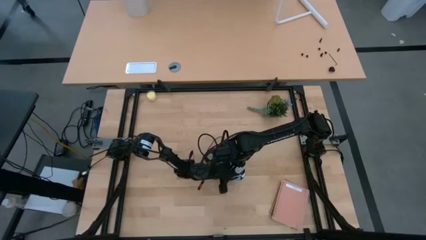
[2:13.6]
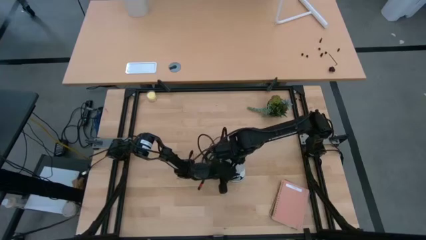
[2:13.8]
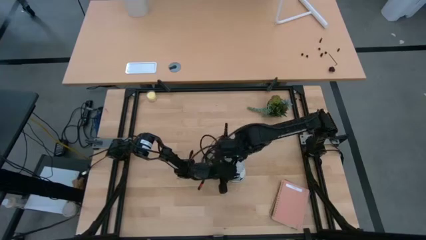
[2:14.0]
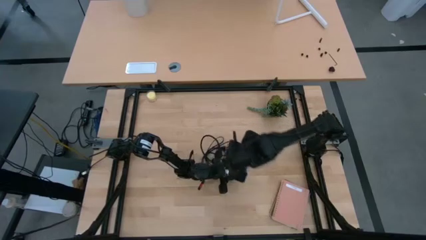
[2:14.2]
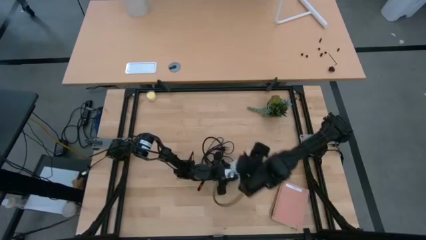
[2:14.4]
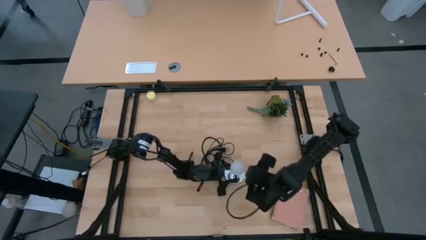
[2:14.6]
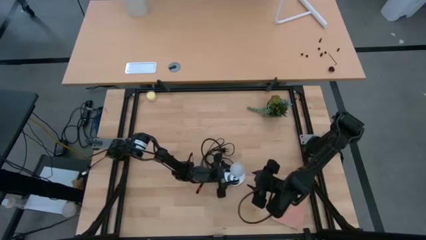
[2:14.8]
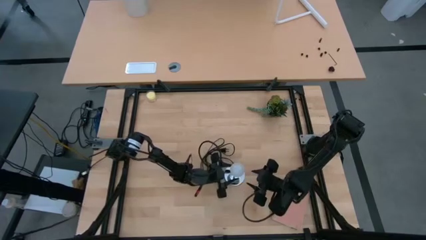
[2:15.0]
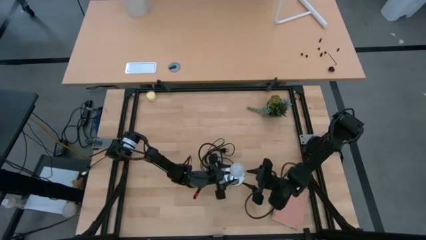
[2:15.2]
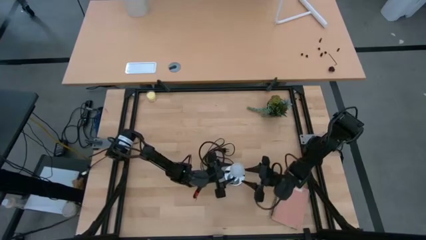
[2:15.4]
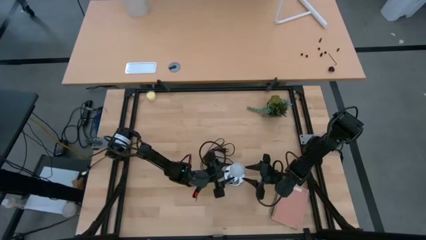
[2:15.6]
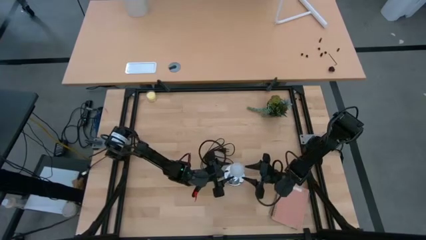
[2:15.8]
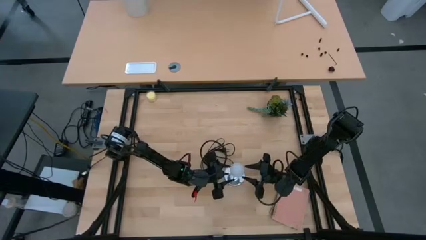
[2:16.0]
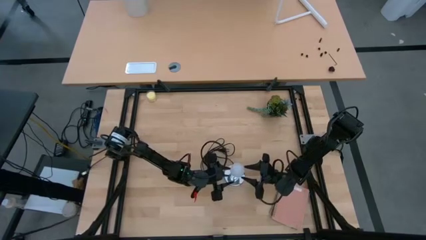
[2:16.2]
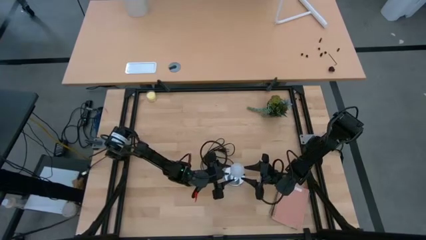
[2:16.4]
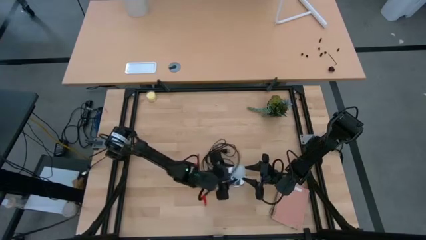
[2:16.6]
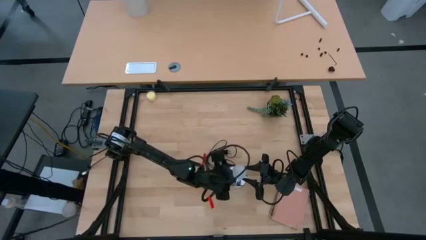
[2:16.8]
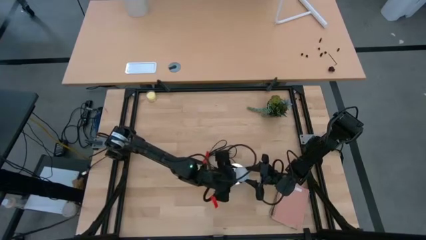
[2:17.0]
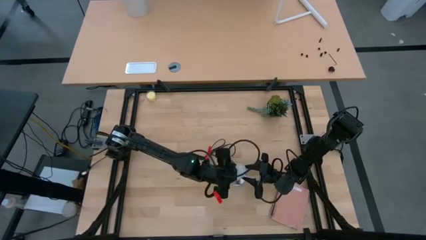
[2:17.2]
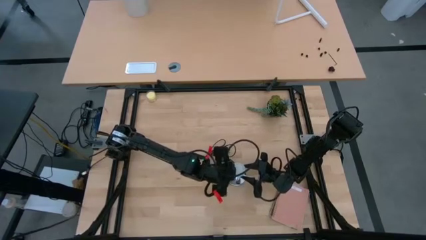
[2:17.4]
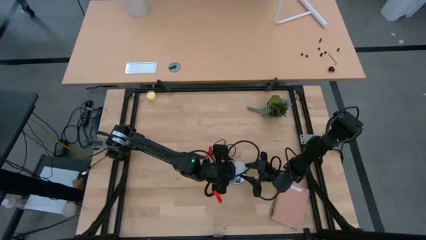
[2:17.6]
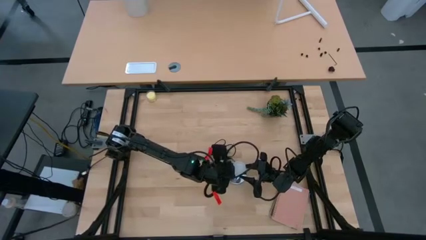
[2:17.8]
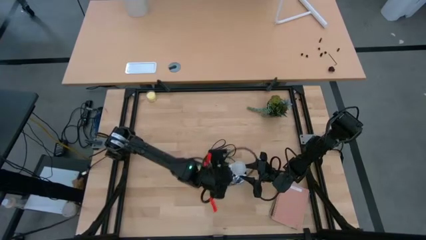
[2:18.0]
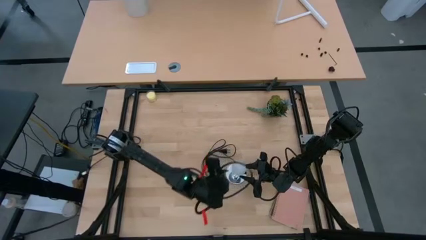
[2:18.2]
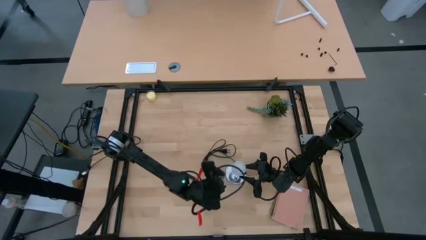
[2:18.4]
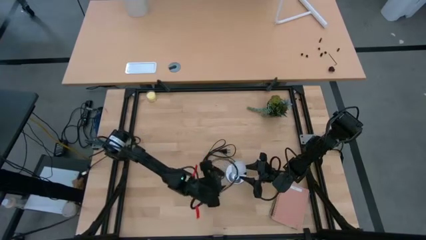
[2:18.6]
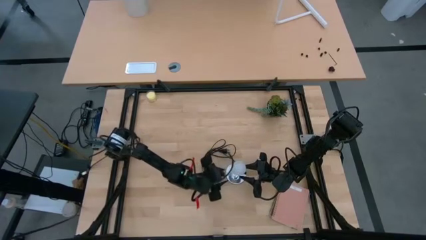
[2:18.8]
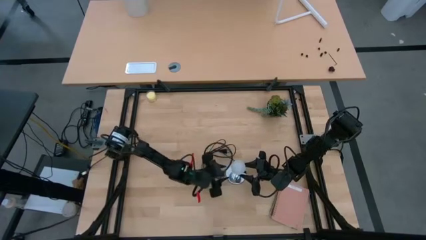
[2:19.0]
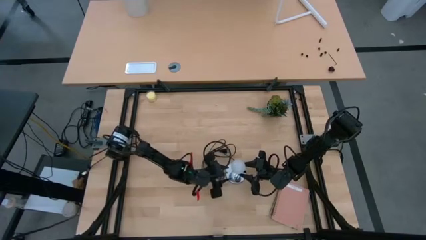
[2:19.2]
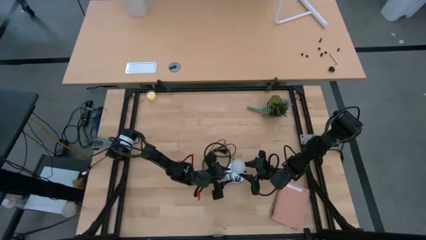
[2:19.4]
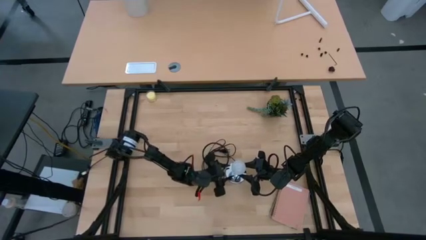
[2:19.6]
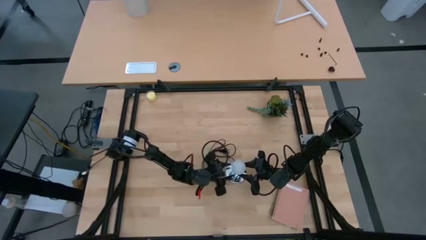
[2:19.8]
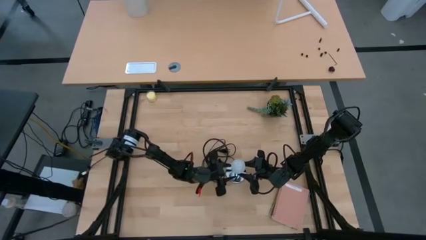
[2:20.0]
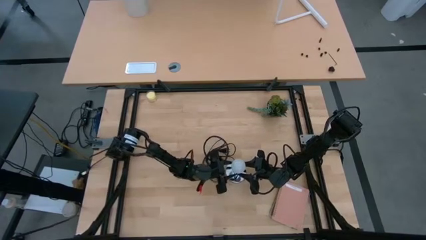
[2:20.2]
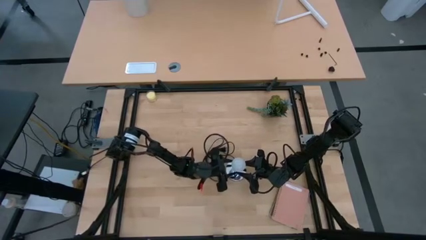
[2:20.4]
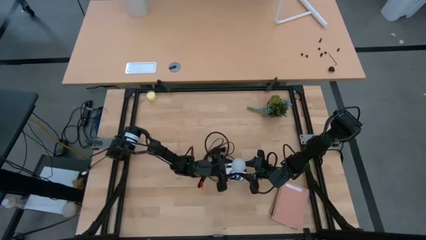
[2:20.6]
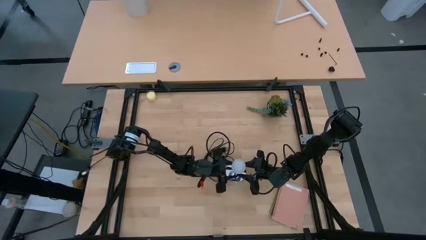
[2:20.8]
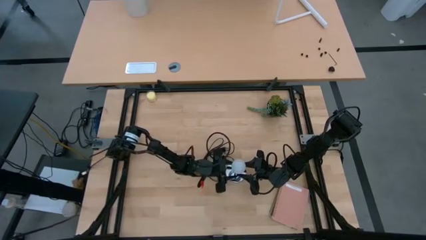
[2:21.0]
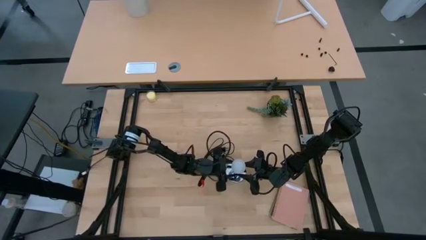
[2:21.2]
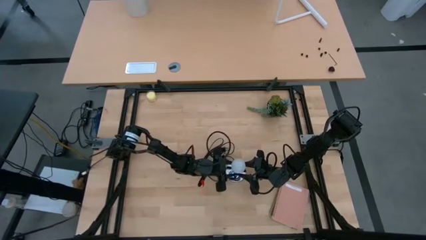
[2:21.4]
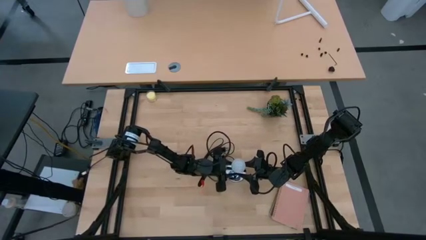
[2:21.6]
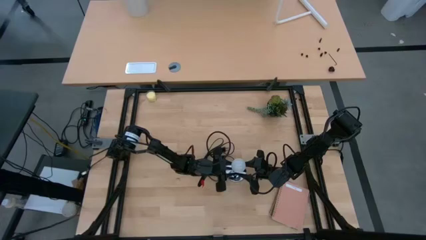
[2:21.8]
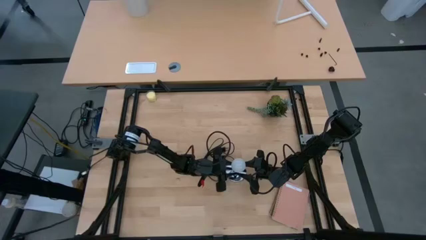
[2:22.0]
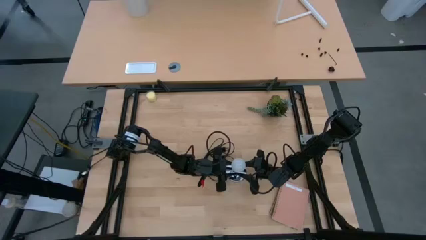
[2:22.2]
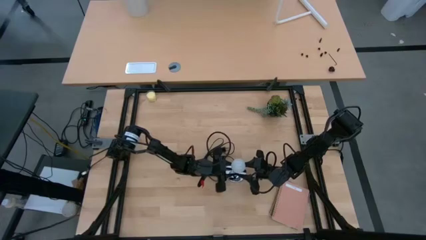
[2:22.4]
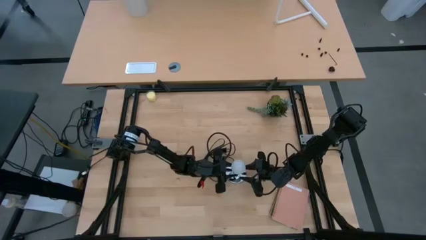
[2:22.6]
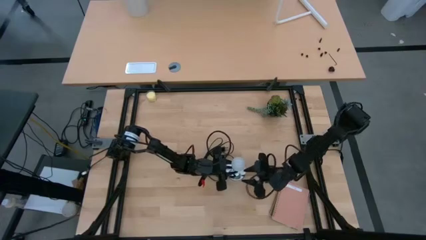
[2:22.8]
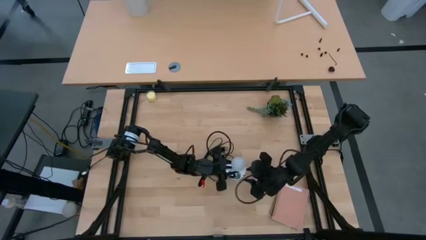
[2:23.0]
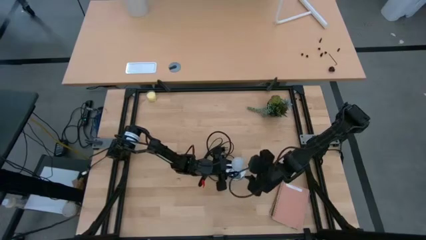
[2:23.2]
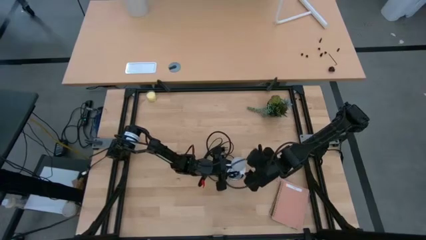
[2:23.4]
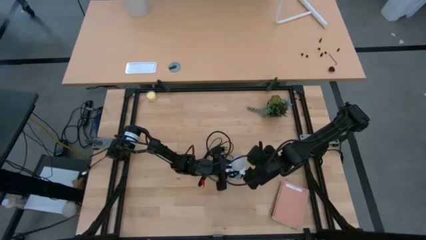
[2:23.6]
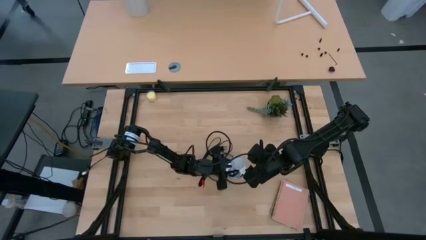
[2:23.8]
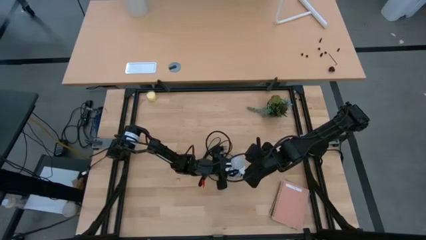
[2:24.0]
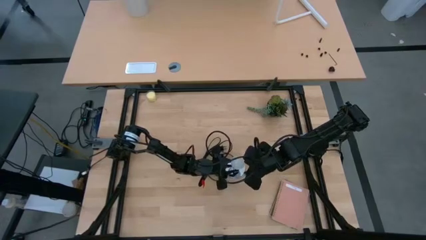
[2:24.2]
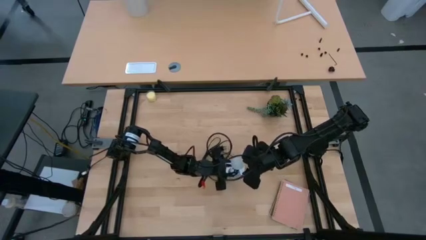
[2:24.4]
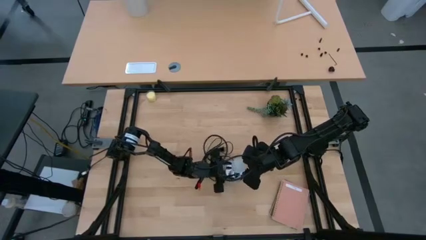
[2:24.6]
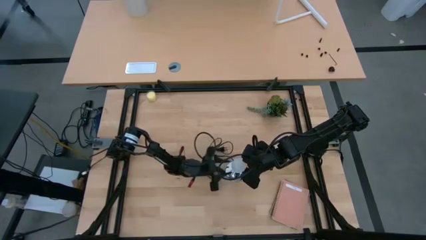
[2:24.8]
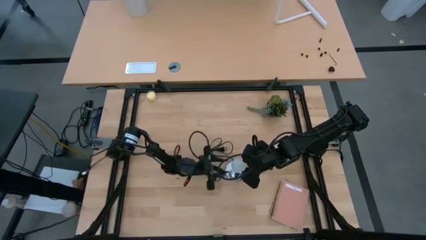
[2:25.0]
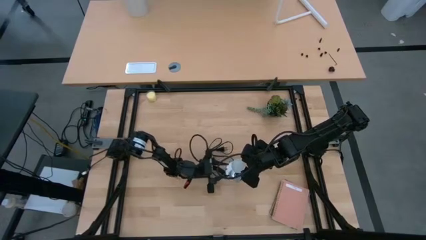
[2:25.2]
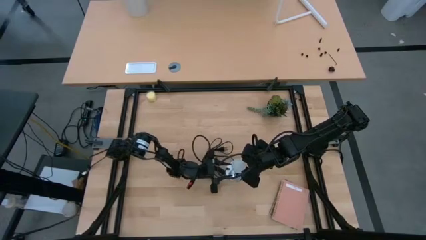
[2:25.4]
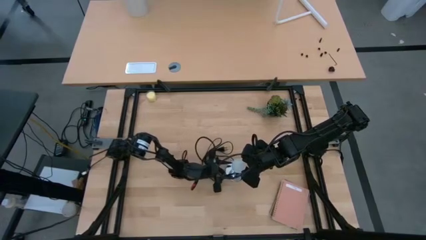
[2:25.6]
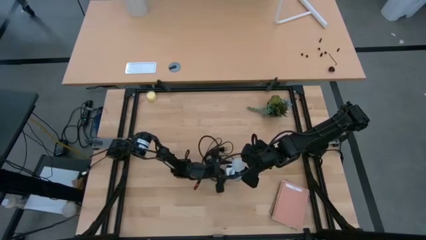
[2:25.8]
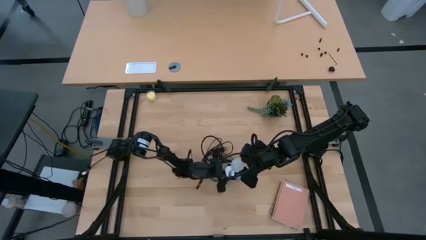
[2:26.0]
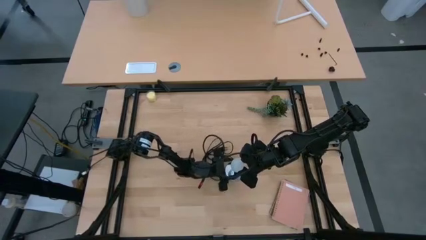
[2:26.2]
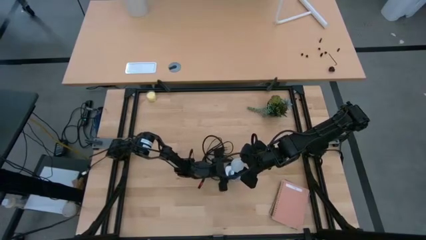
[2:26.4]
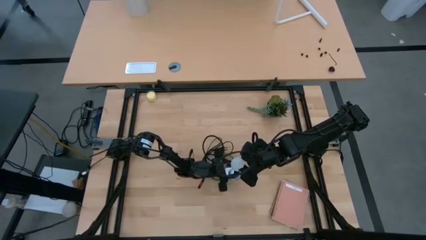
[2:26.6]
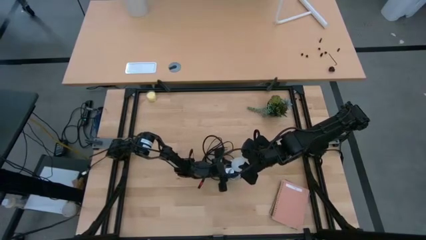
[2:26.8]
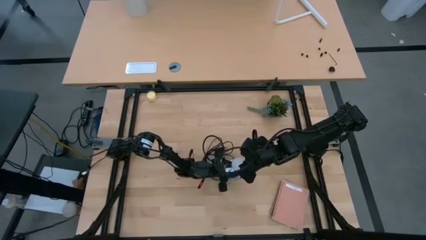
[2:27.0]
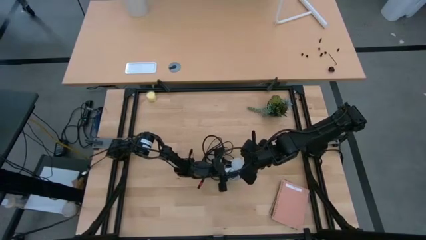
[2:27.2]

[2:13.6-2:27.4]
Task: Screw lightbulb
Remove the light bulb from the lamp
